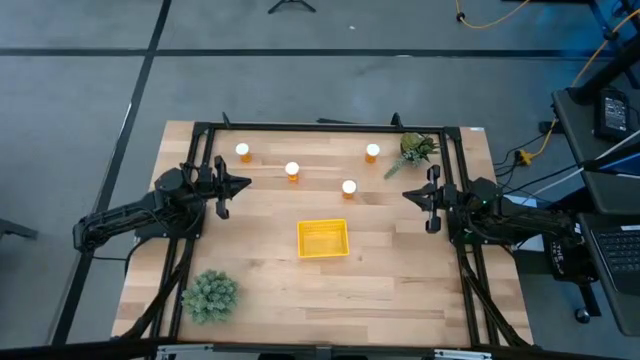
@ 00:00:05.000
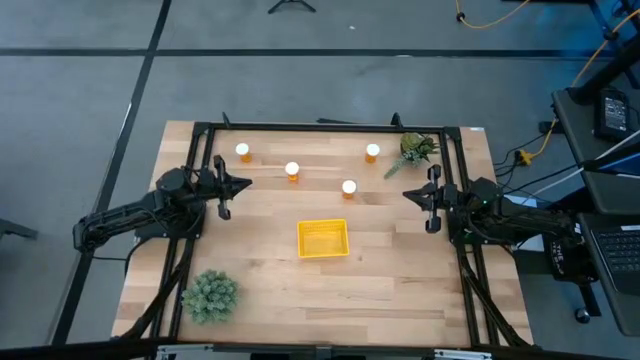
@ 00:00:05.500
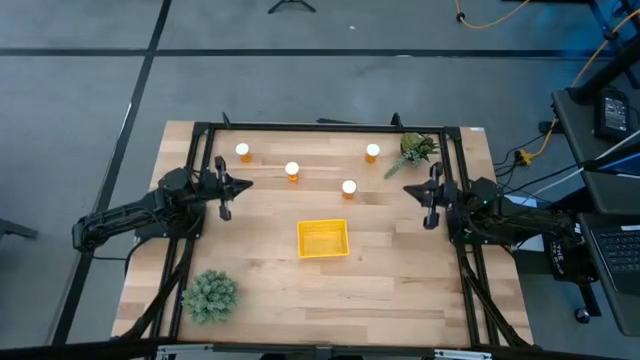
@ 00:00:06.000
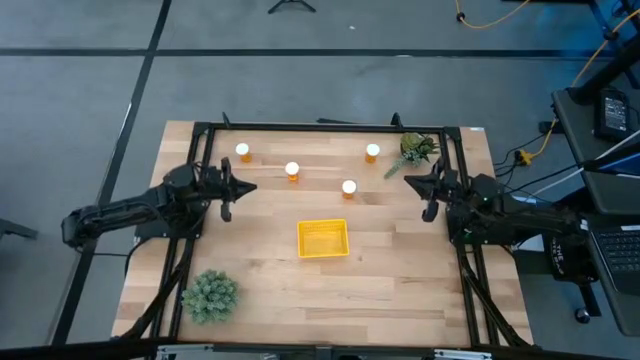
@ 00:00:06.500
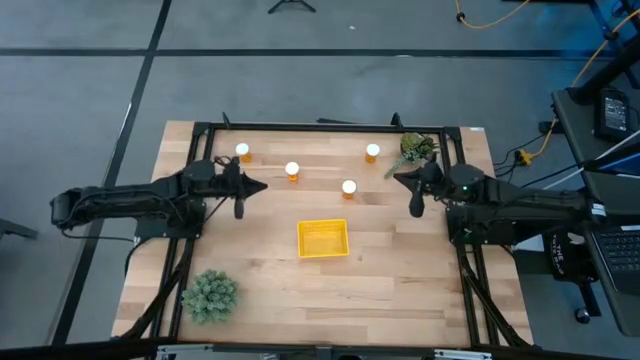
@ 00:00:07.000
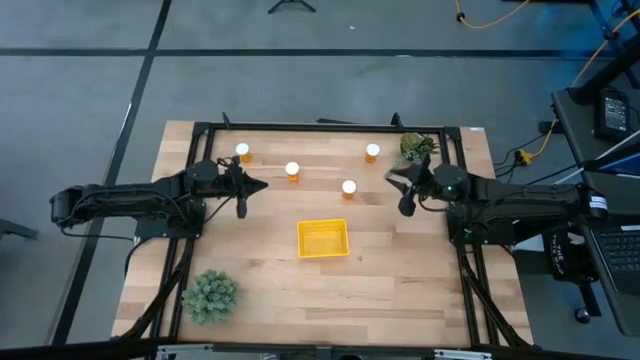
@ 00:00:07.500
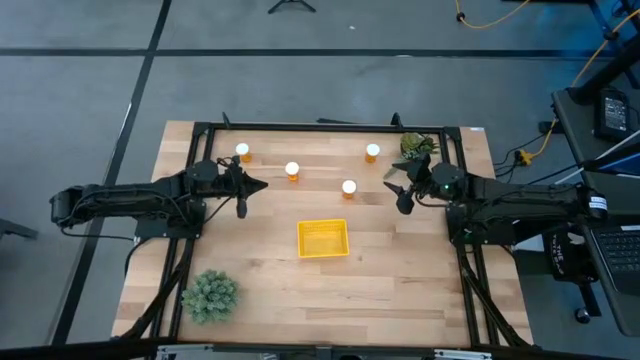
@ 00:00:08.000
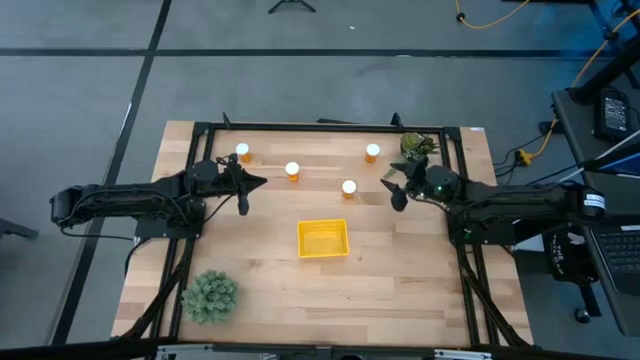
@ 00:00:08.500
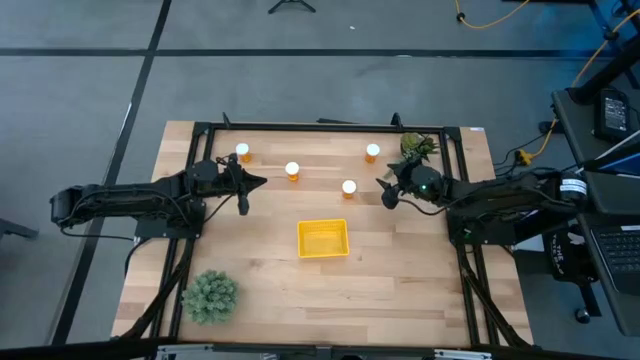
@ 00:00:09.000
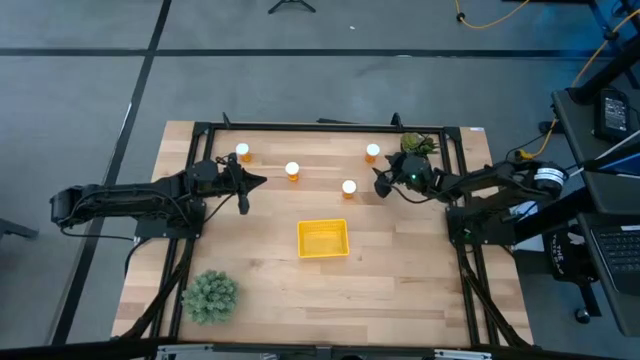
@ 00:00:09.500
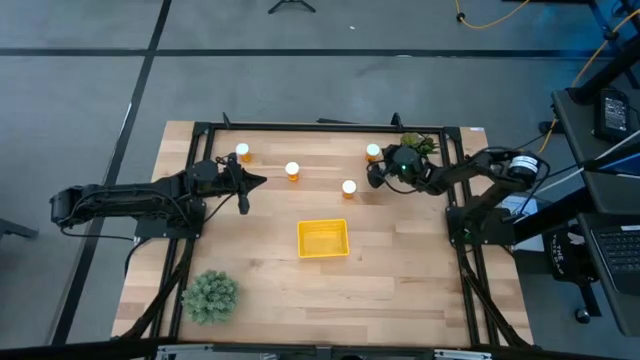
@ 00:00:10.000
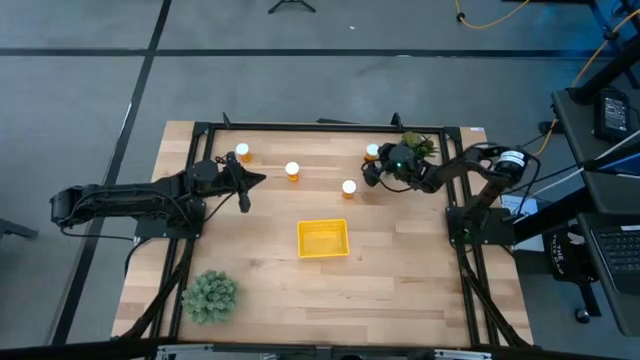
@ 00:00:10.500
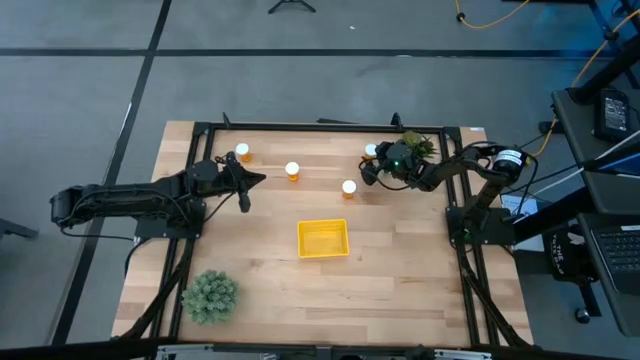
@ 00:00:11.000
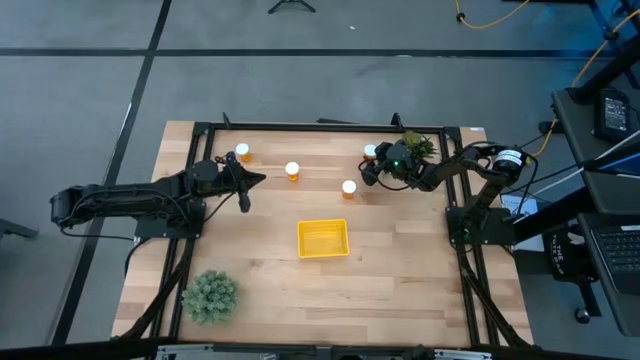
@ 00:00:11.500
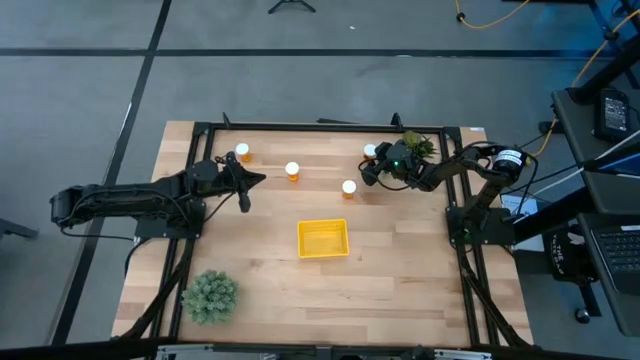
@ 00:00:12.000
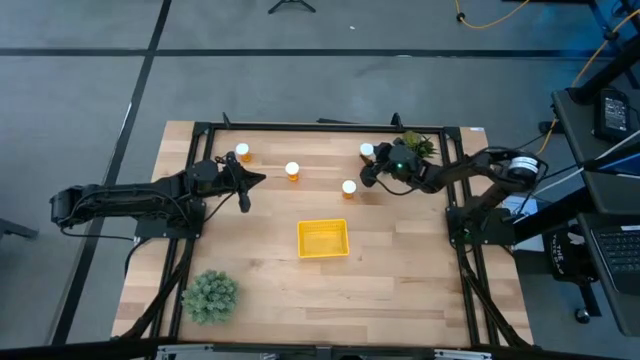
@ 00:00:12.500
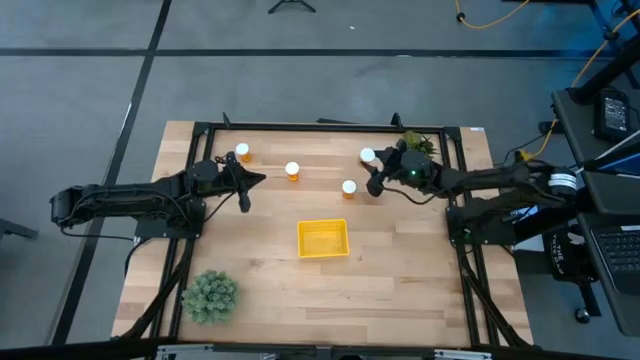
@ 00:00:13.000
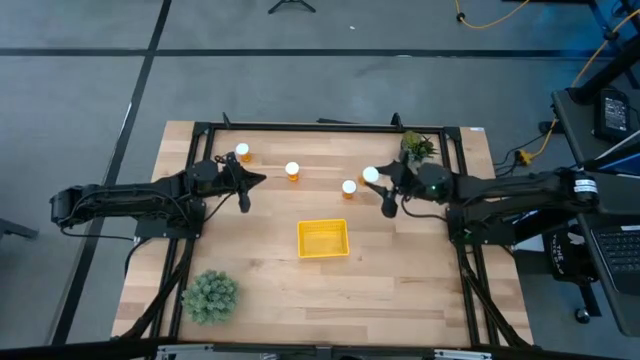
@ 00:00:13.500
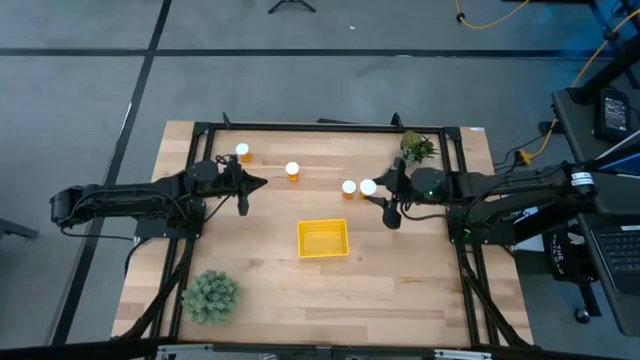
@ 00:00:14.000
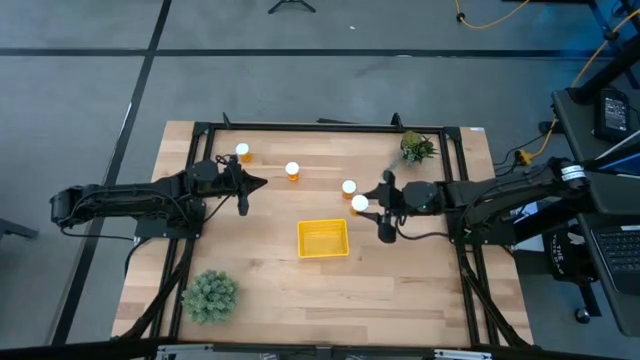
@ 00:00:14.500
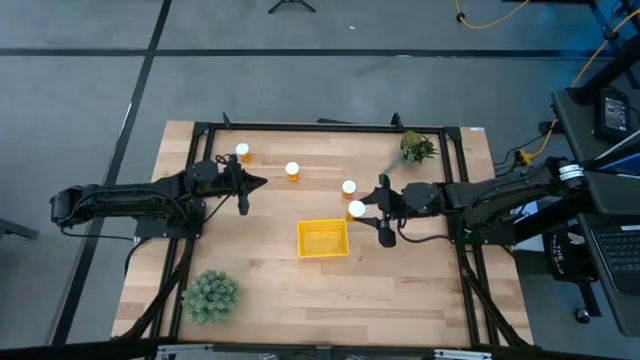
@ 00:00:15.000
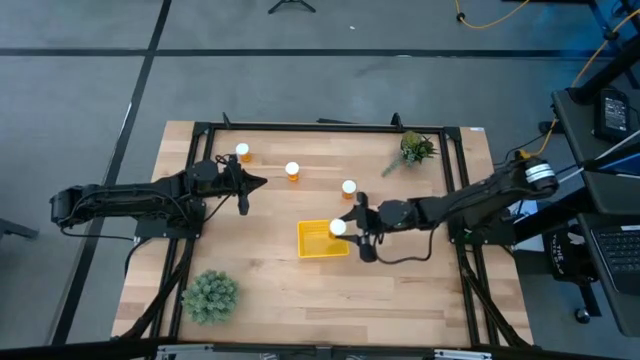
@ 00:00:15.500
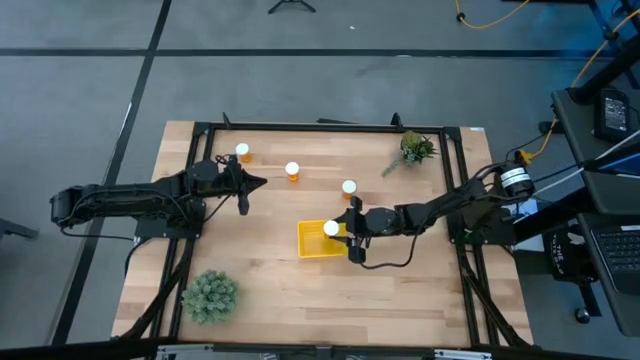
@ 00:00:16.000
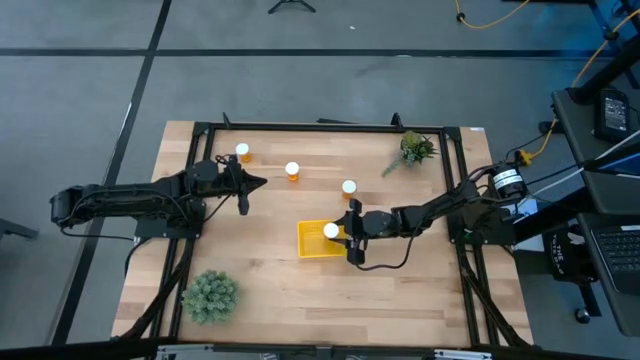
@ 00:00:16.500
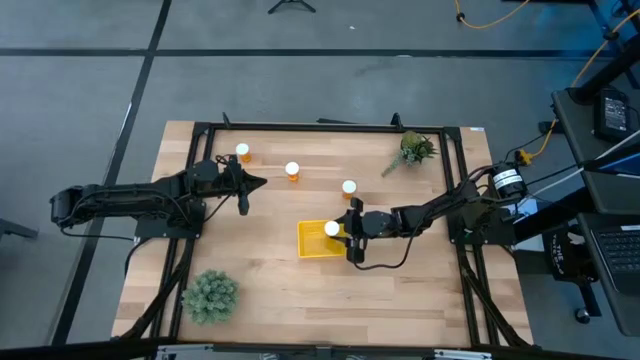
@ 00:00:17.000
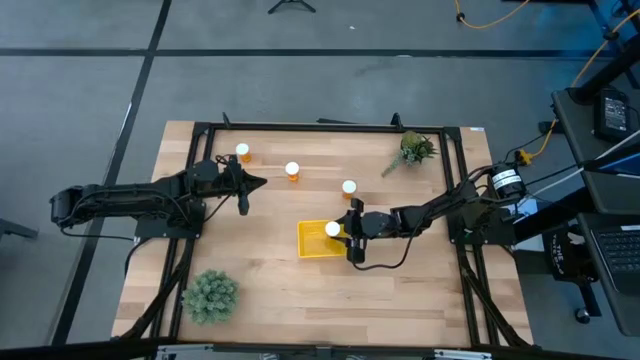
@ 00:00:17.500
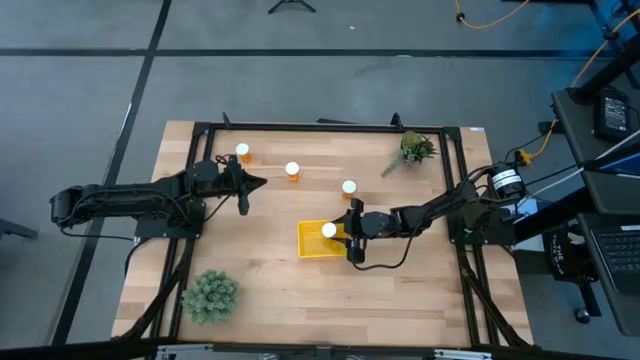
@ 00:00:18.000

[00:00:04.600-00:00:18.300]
Task: Pick and place pill bottles into a basket
Put the orange pill bottle into the yellow bin

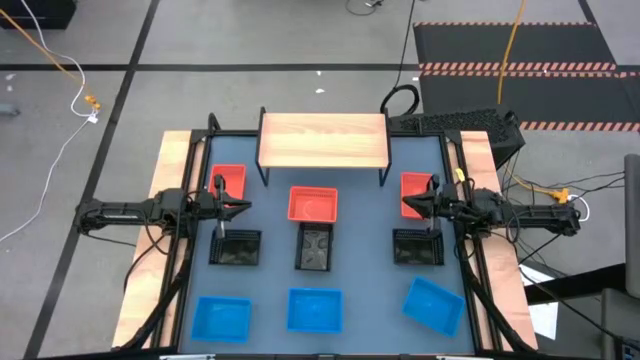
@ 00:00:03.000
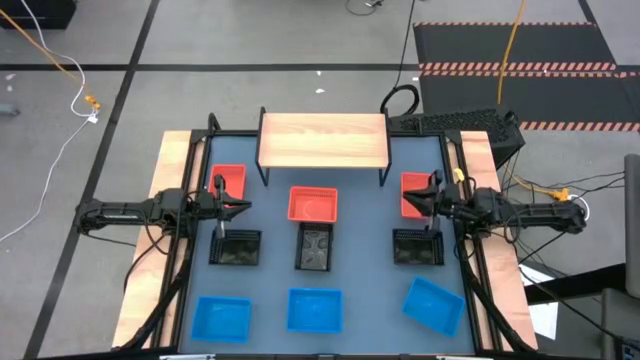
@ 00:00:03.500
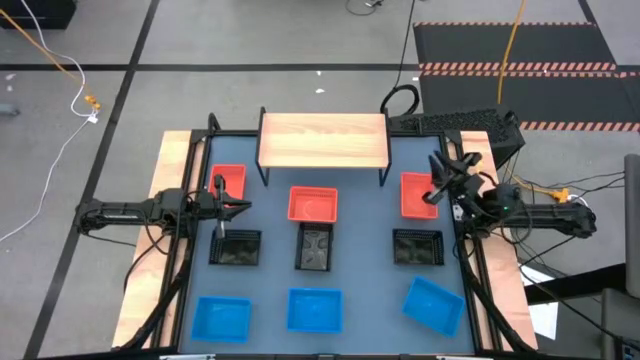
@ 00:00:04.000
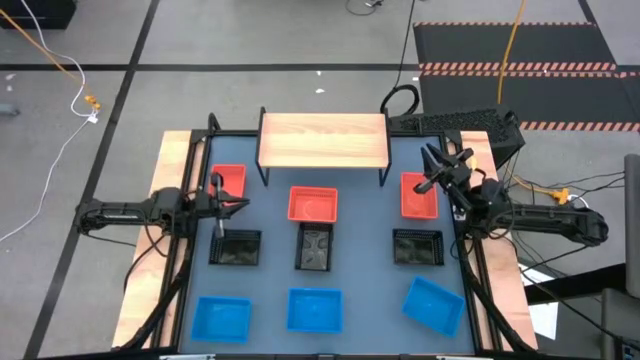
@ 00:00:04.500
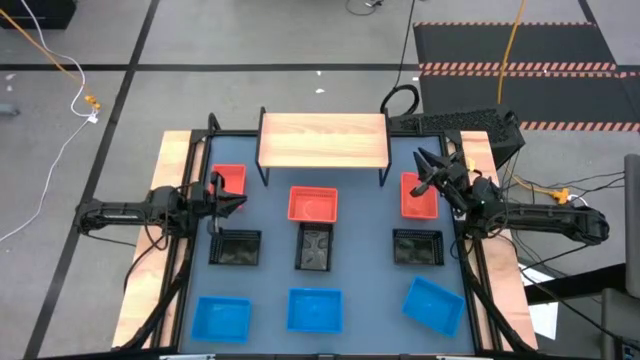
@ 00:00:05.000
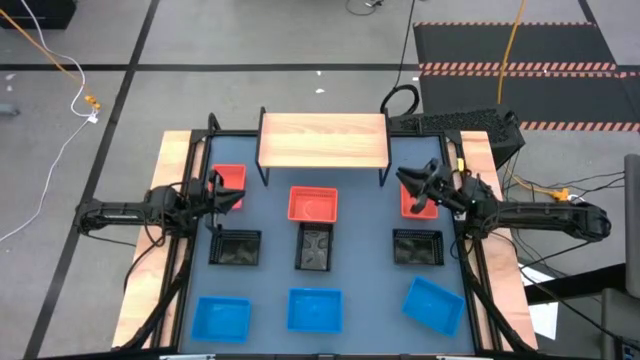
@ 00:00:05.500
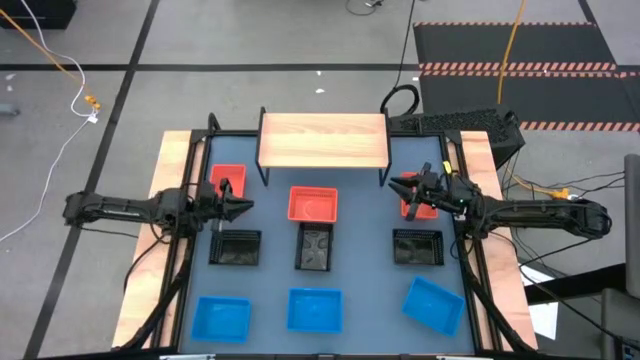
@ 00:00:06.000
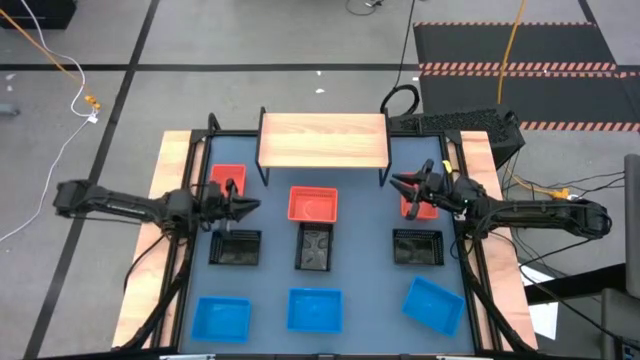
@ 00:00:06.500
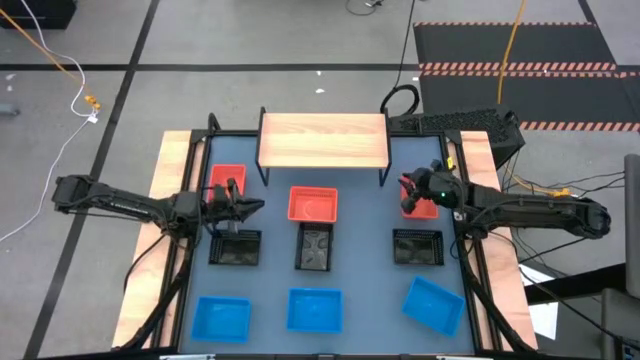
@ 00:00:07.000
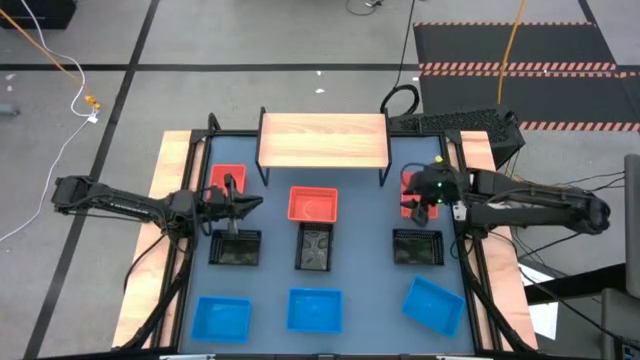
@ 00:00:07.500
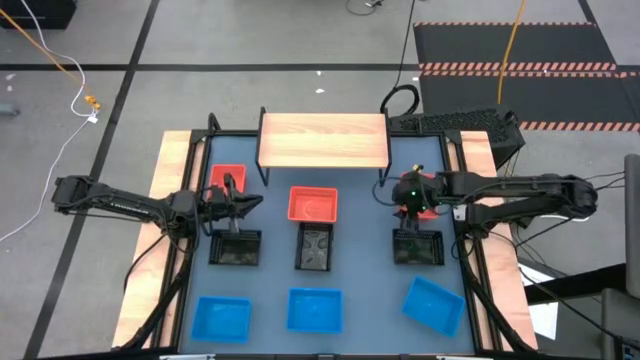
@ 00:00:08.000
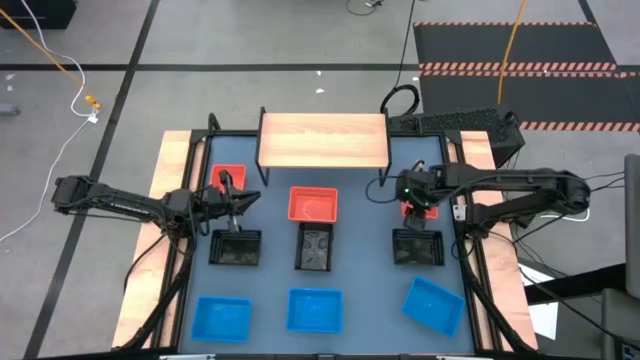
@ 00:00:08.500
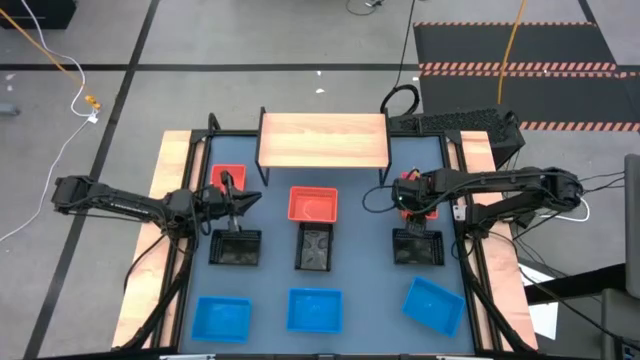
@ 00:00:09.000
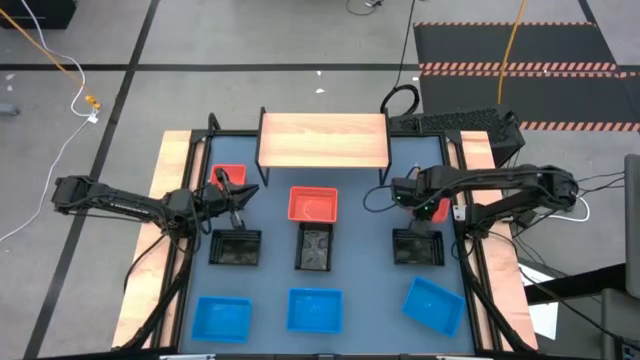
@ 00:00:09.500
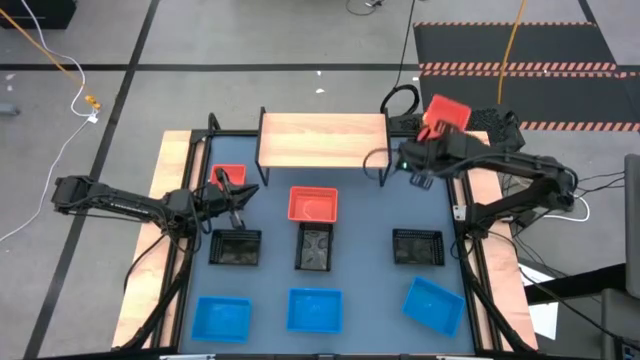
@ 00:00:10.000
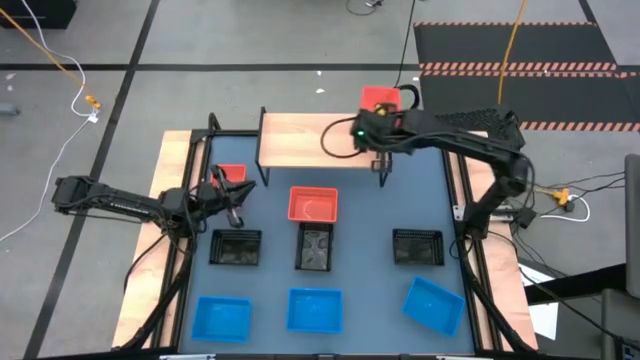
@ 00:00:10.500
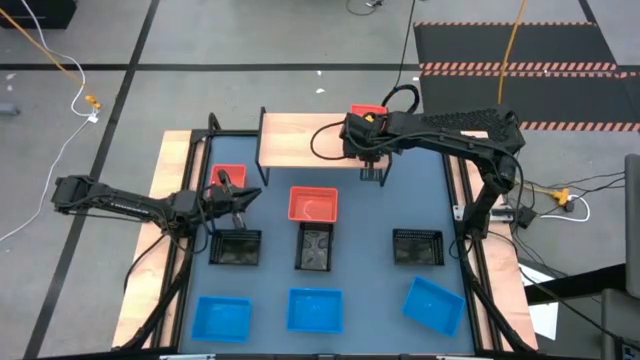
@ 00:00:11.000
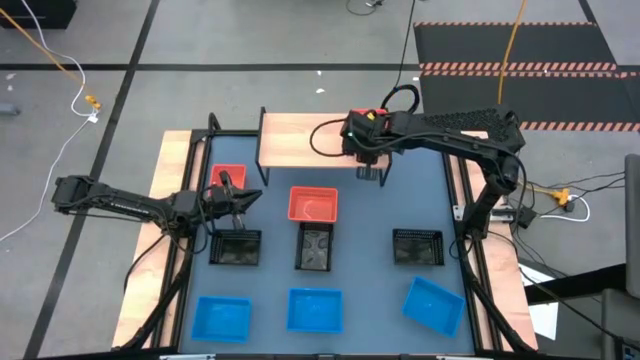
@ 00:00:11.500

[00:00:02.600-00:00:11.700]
Task: Stack baskets on shelf by color
Put the right orange bin on the shelf
